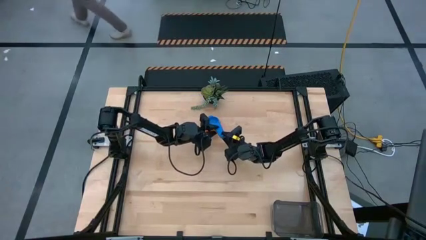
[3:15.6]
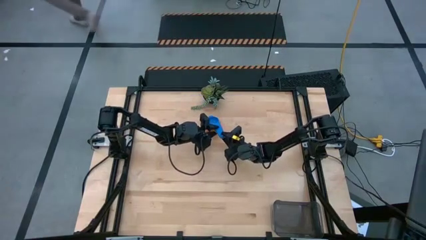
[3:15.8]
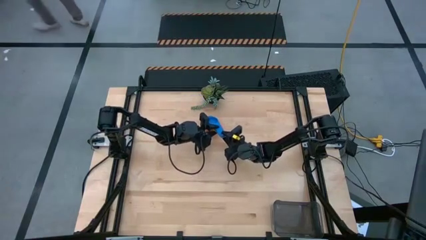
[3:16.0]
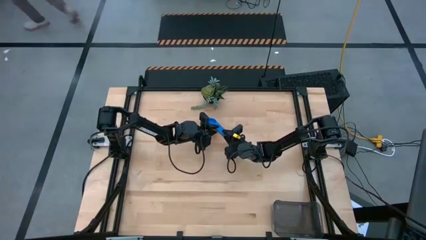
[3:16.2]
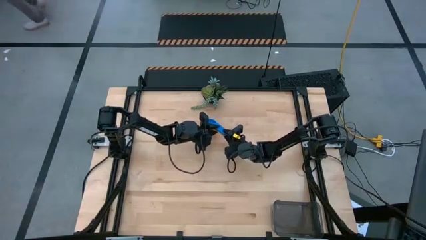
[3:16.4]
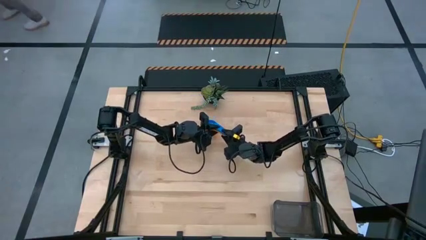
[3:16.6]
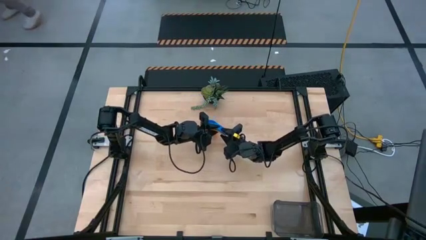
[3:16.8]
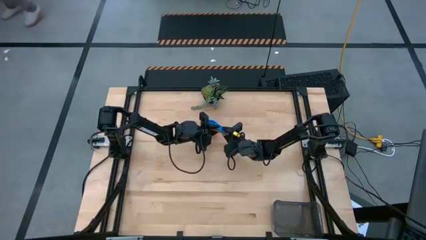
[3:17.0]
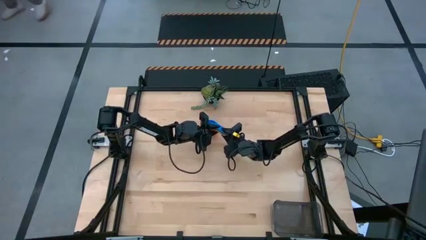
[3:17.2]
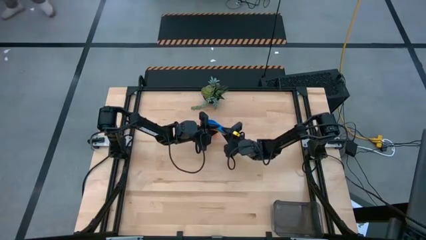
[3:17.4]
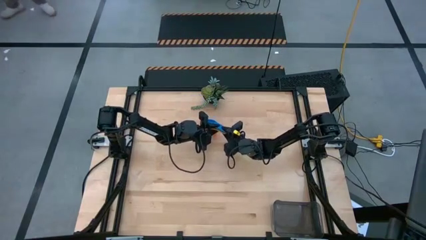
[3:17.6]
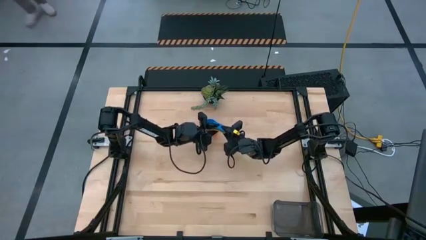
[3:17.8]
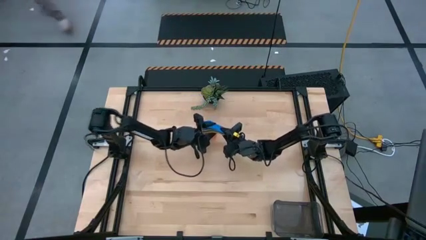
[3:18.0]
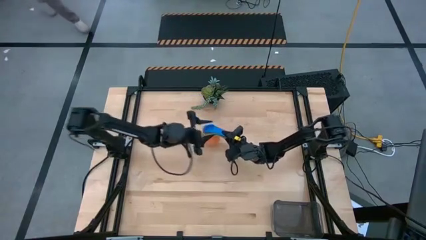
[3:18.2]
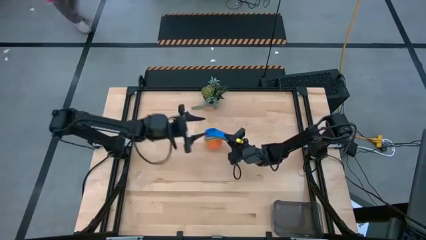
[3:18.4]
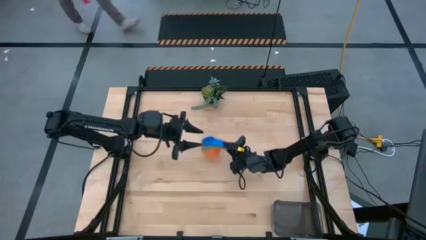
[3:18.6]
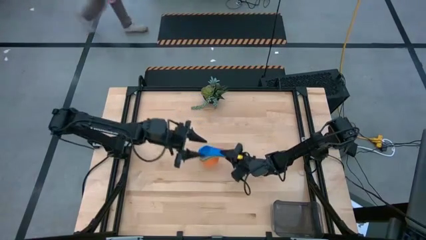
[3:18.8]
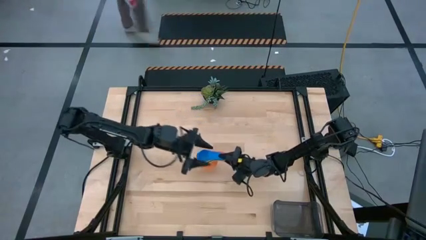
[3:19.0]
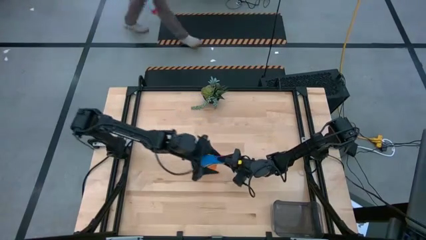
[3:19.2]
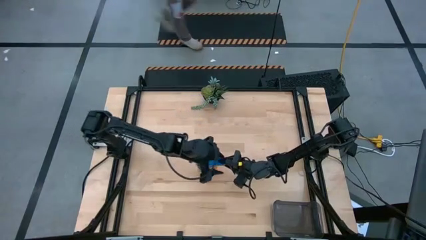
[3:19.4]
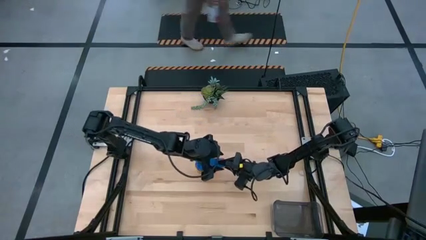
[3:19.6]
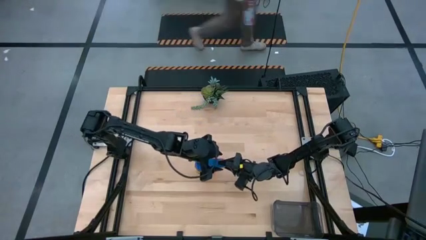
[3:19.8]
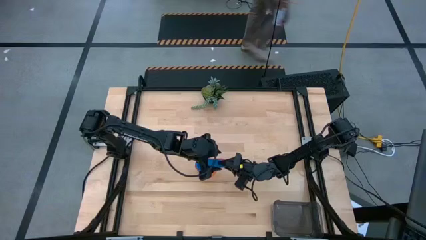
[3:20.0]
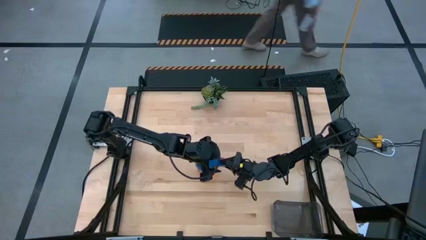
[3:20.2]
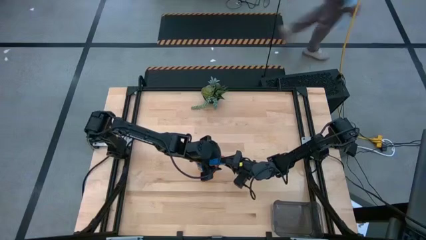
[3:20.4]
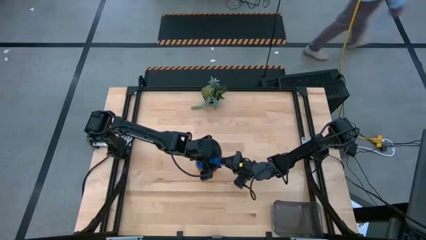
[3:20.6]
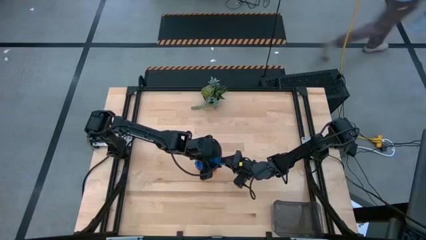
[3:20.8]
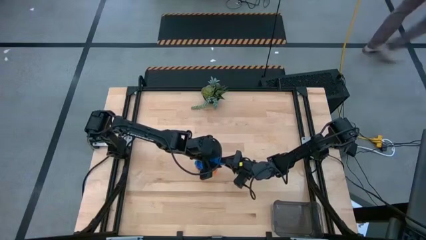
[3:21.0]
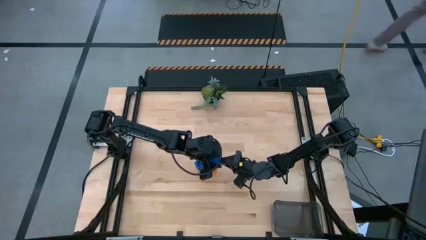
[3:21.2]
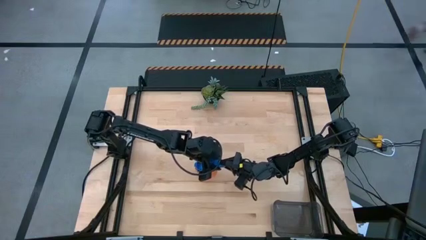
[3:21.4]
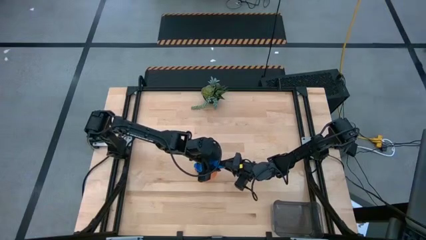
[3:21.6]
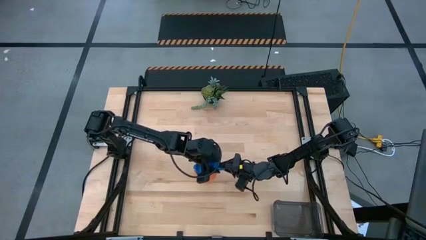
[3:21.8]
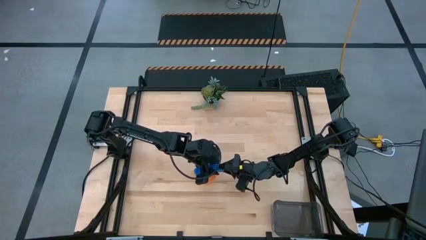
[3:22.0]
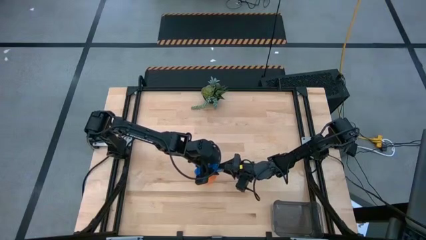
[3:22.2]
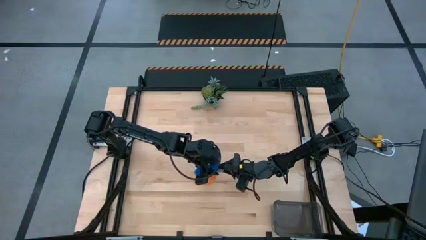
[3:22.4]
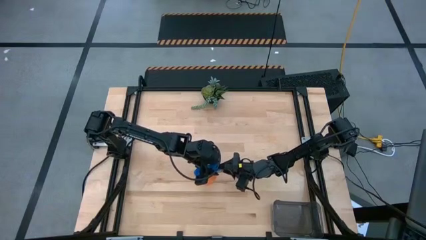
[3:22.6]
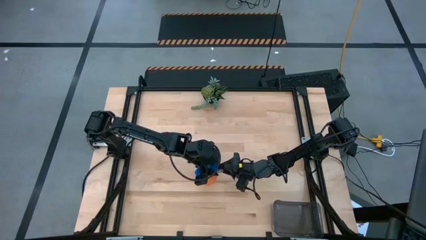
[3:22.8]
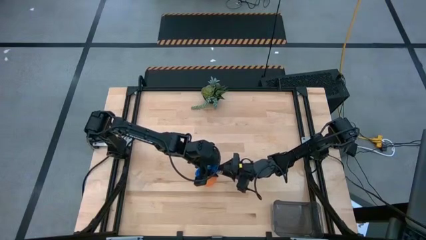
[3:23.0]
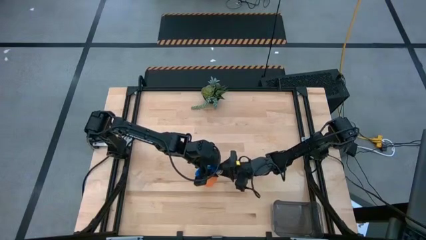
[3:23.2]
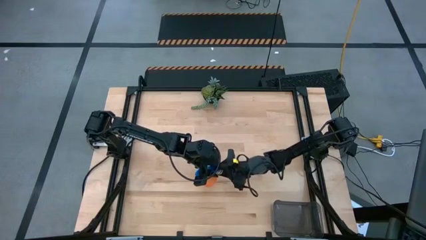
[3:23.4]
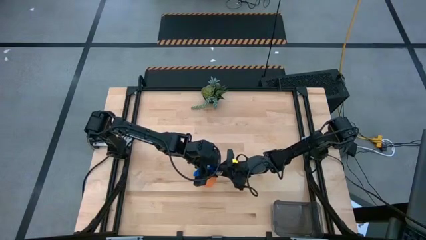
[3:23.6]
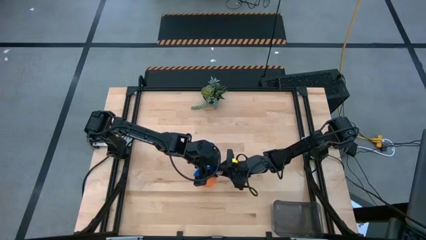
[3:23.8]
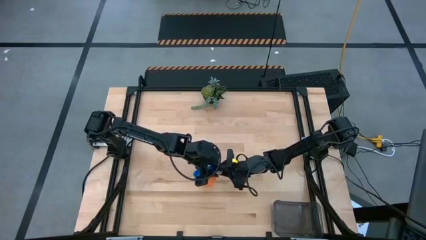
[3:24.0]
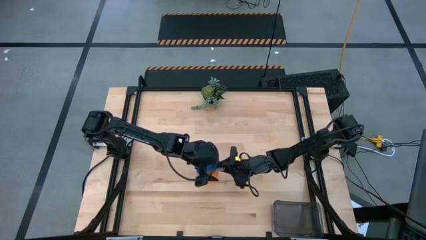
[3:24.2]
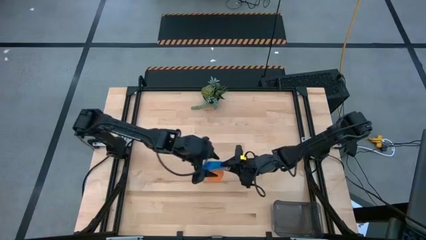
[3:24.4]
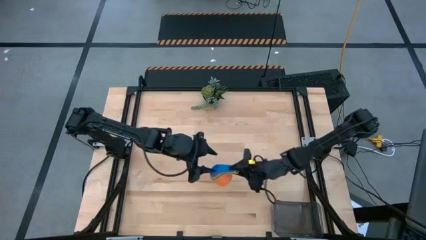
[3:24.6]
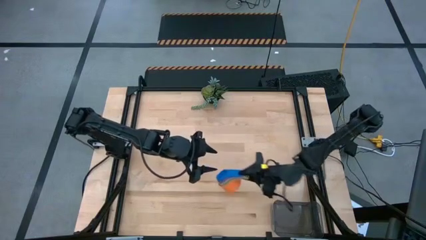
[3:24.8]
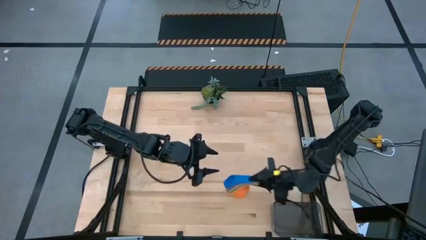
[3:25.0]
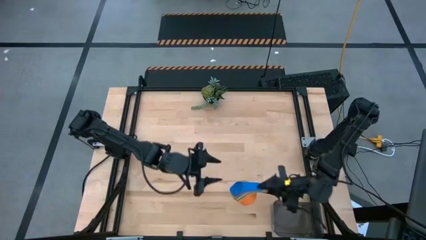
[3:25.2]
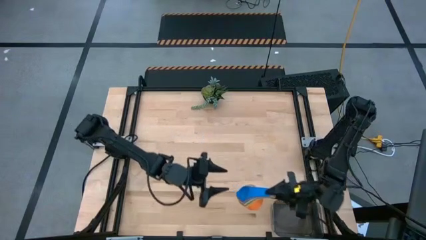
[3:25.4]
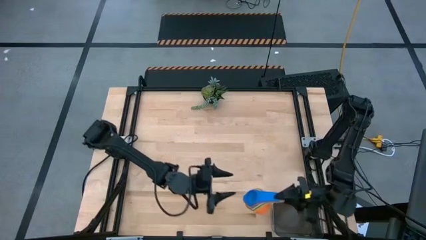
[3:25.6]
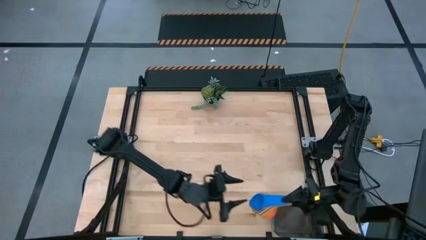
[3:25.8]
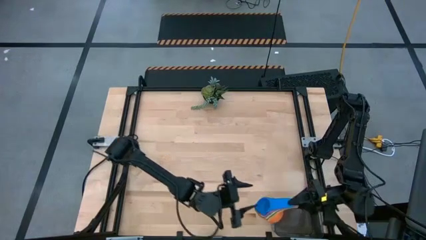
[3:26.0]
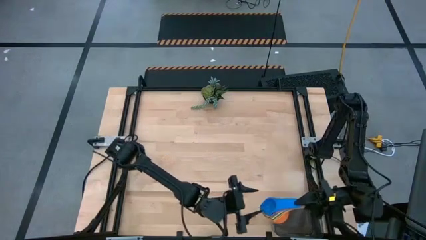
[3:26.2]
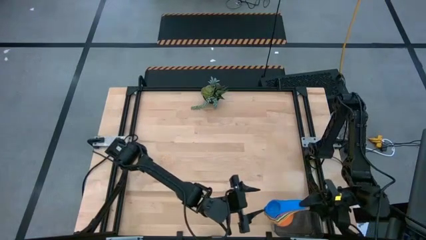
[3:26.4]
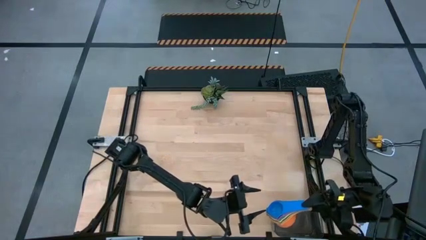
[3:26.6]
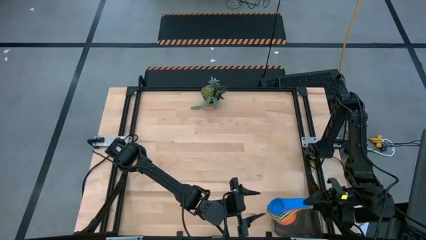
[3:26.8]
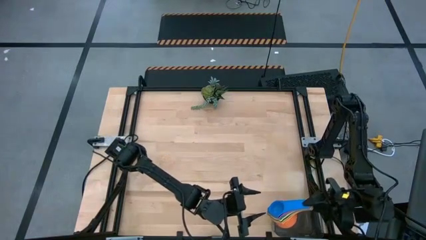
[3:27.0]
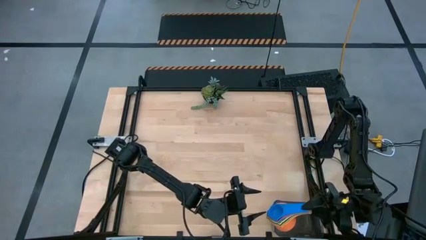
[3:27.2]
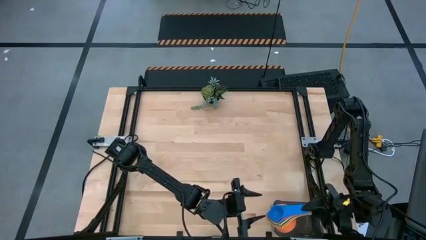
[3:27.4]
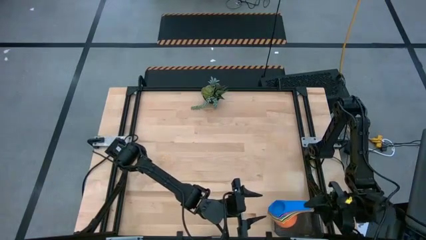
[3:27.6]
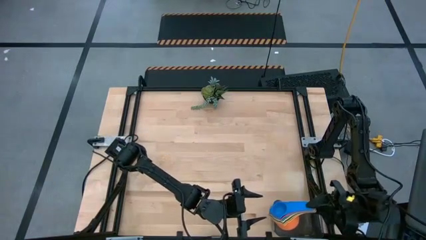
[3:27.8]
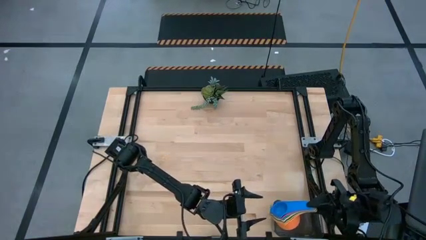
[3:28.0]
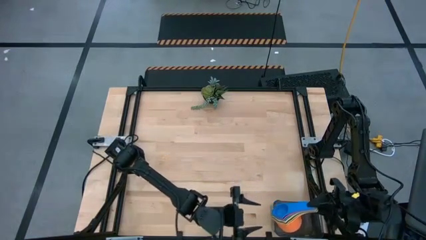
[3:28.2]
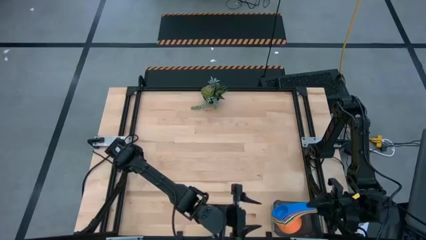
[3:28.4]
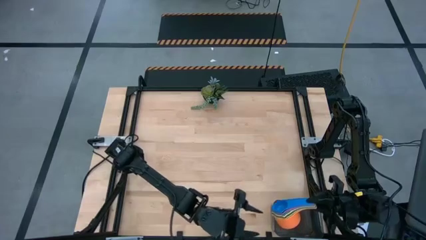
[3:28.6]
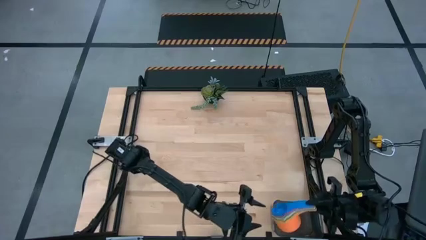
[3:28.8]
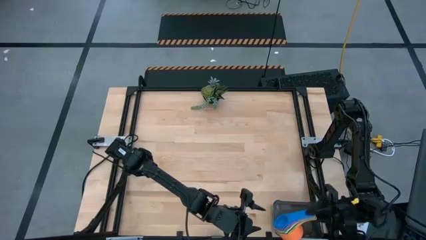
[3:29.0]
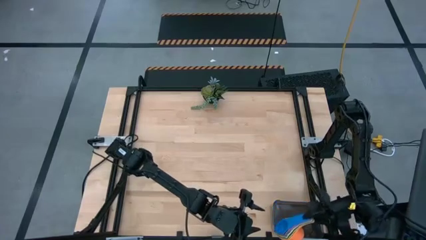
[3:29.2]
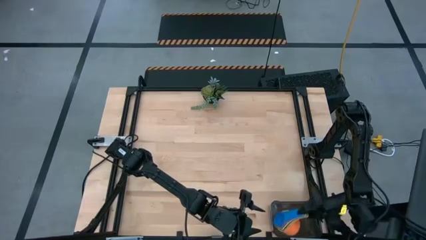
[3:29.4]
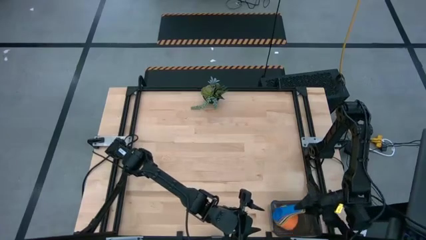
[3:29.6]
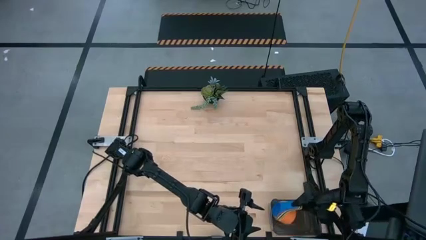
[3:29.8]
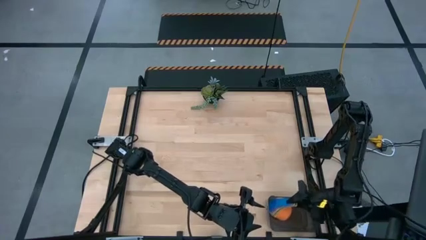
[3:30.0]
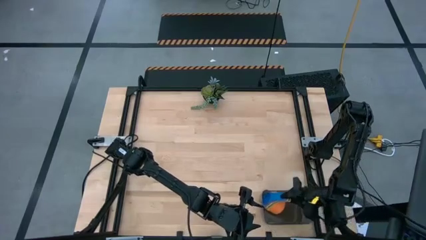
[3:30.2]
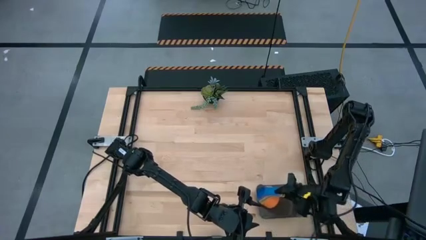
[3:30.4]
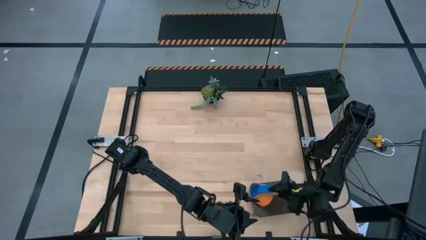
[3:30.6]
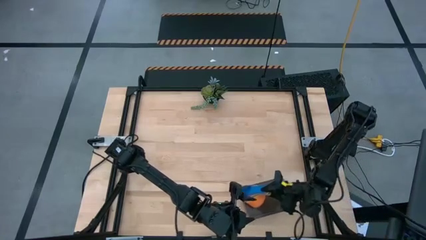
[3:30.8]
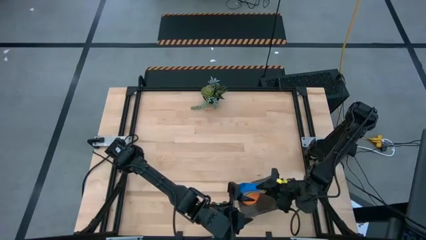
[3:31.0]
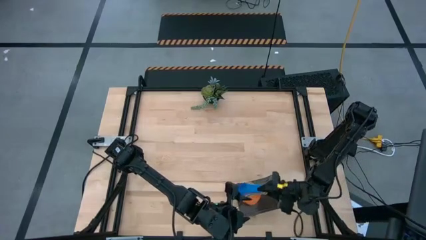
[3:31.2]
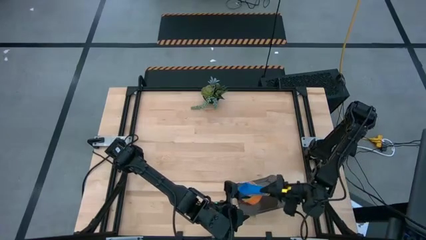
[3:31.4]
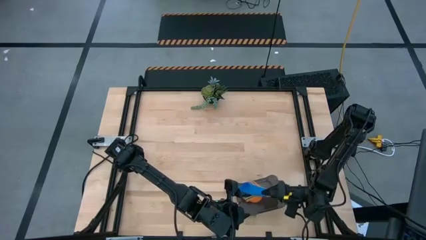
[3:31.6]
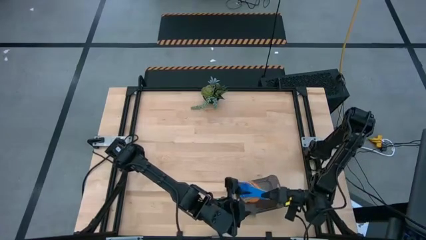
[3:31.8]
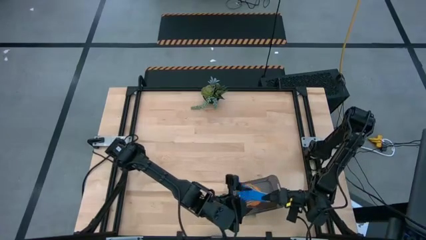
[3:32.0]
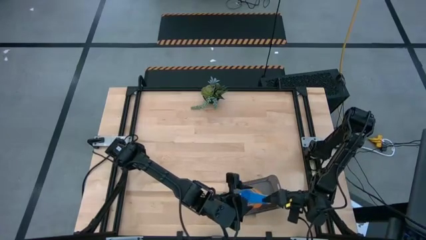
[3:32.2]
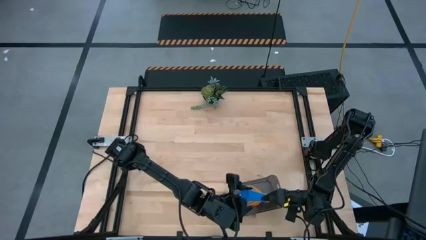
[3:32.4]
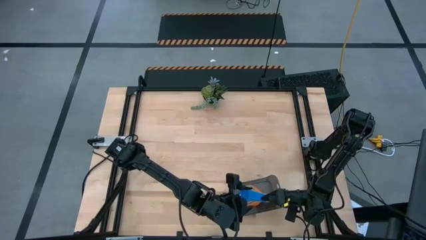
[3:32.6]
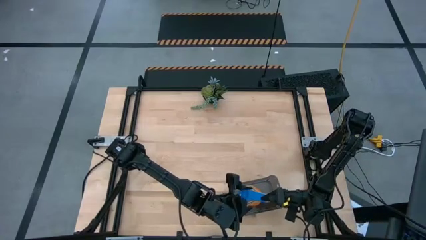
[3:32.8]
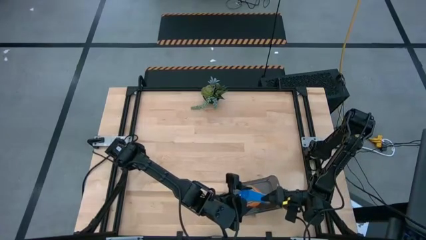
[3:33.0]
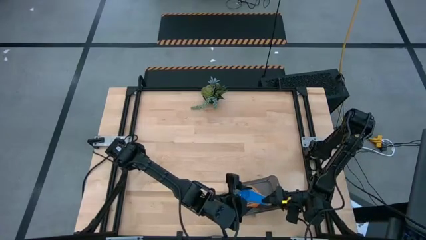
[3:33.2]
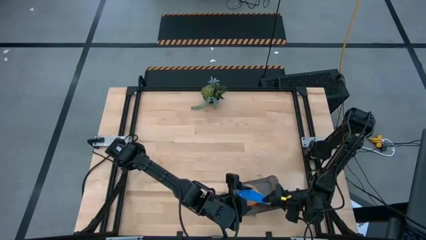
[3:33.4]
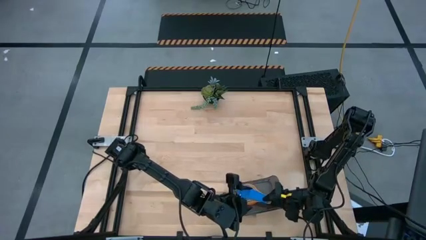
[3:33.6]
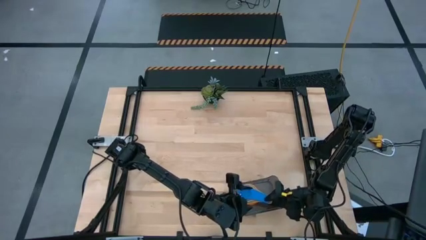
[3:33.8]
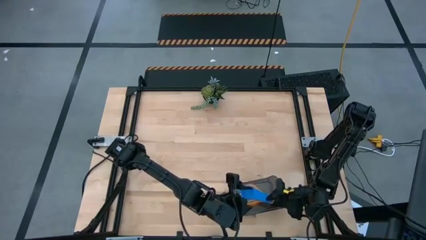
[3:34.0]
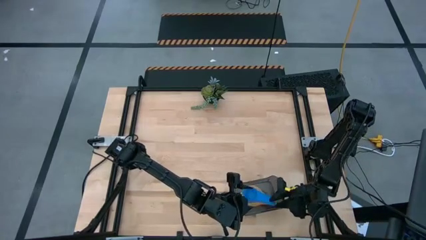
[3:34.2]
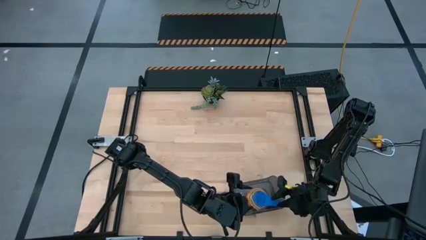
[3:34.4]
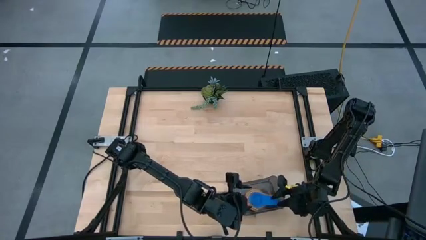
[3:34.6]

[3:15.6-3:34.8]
Task: Nest measuring cups in basket
Put the stacked measuring cups into the black transparent bin
